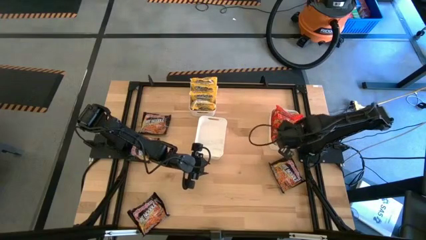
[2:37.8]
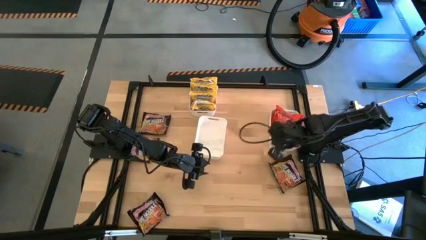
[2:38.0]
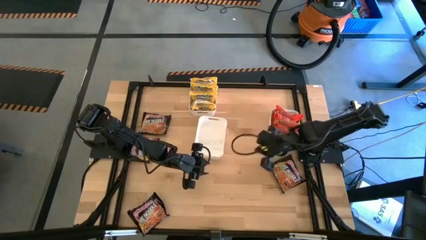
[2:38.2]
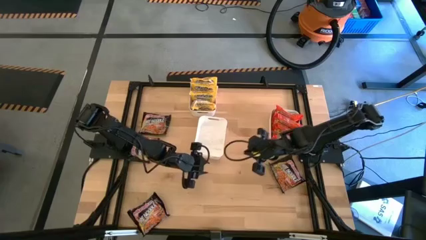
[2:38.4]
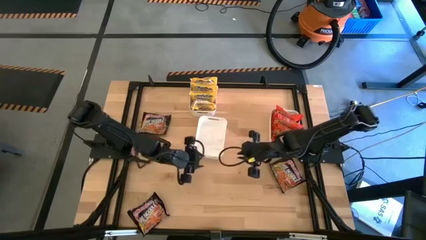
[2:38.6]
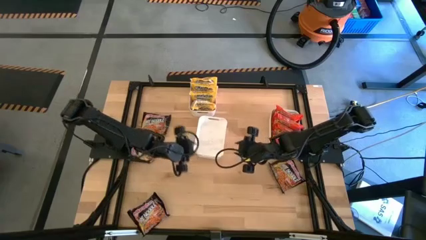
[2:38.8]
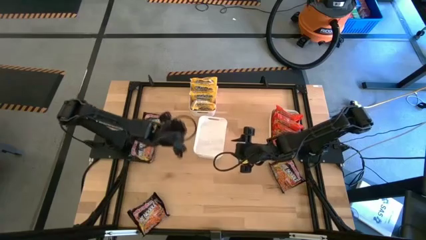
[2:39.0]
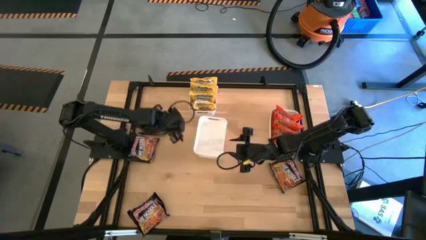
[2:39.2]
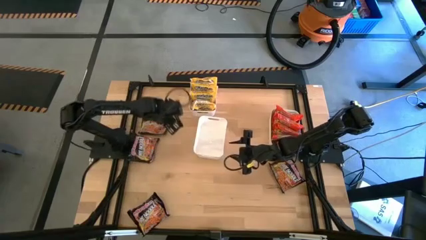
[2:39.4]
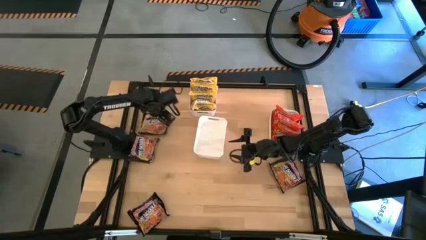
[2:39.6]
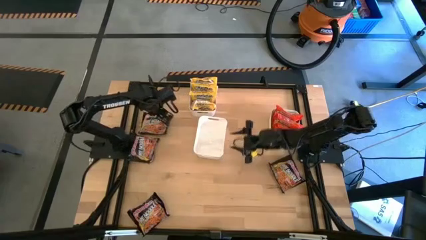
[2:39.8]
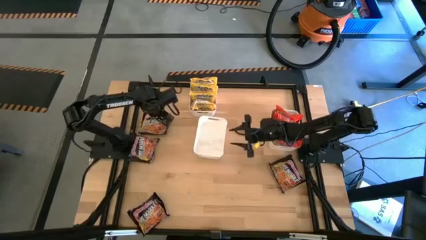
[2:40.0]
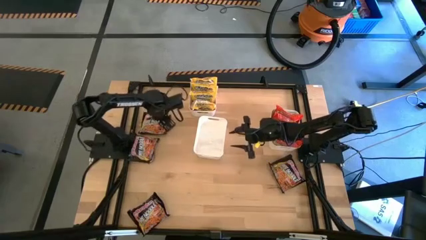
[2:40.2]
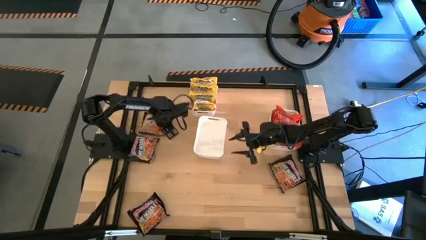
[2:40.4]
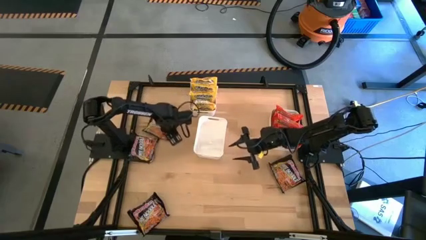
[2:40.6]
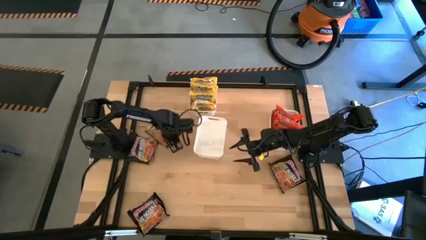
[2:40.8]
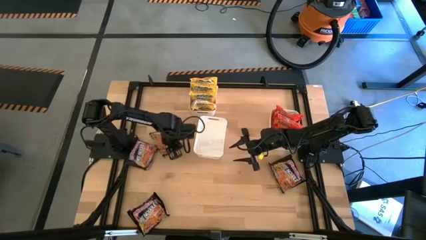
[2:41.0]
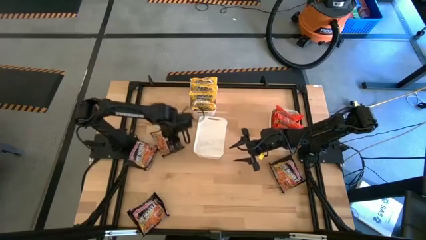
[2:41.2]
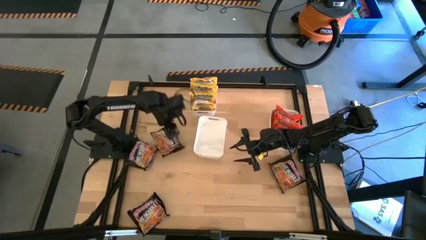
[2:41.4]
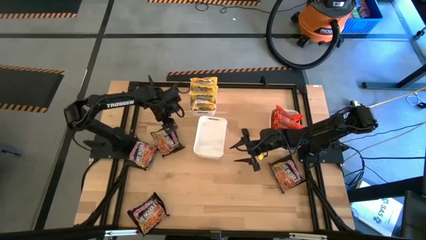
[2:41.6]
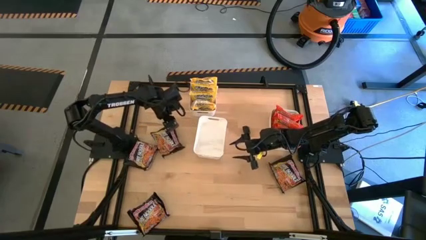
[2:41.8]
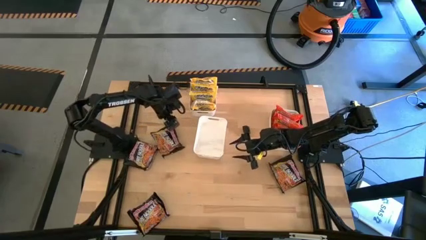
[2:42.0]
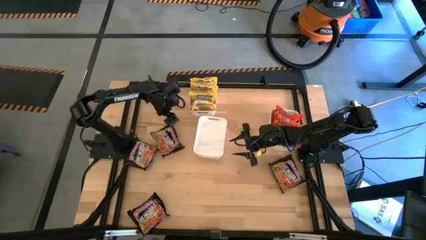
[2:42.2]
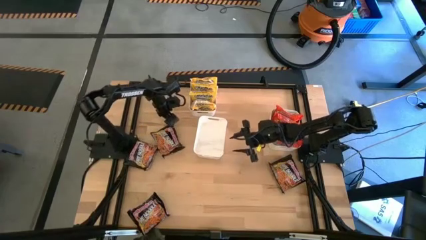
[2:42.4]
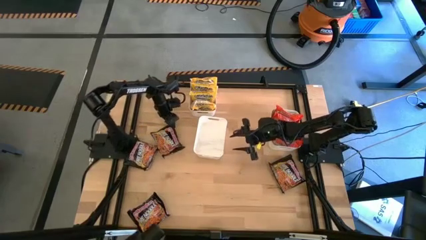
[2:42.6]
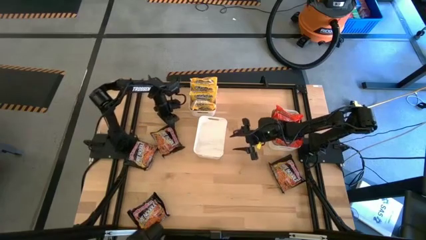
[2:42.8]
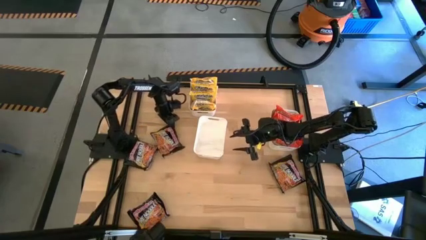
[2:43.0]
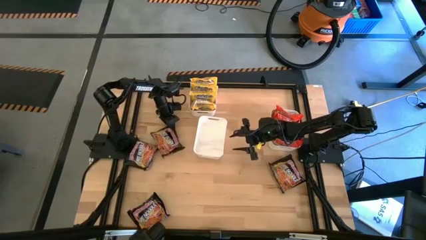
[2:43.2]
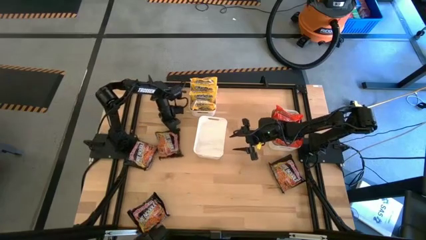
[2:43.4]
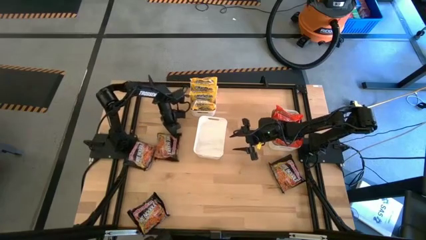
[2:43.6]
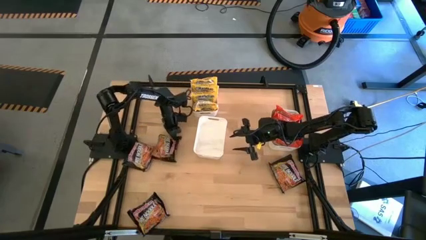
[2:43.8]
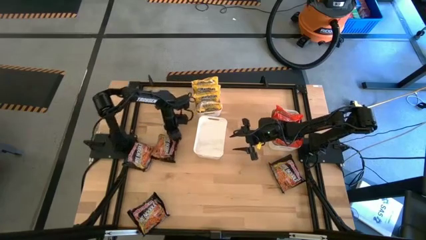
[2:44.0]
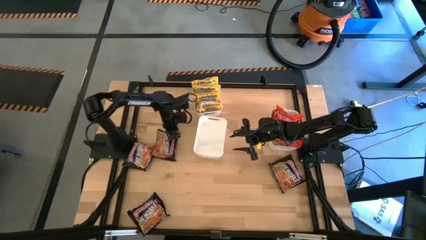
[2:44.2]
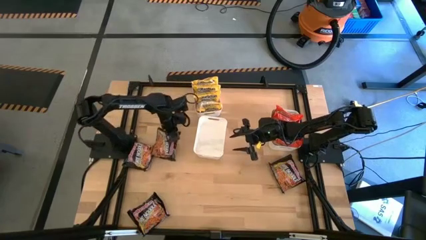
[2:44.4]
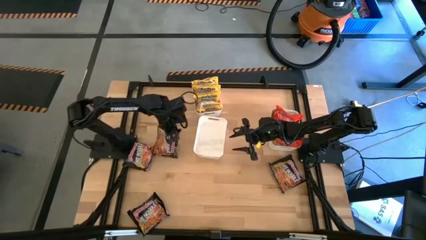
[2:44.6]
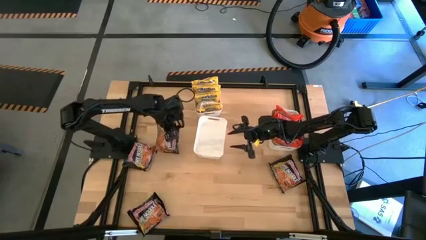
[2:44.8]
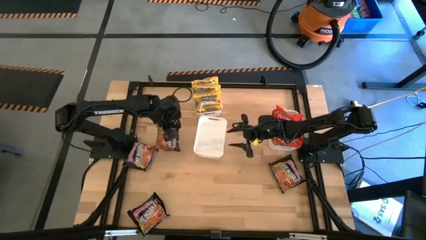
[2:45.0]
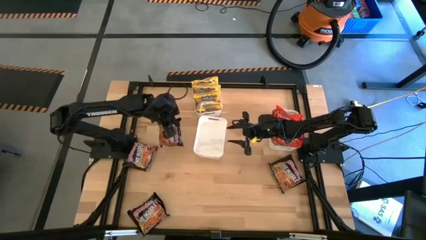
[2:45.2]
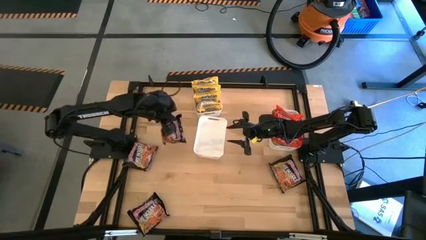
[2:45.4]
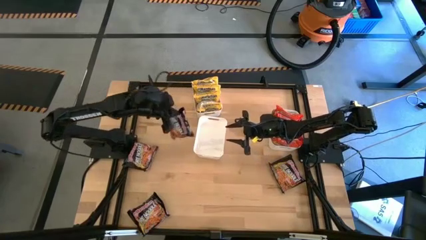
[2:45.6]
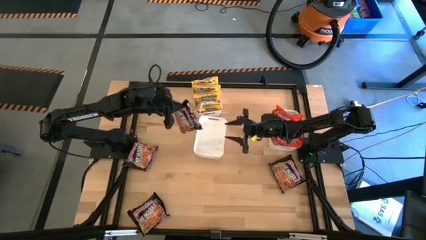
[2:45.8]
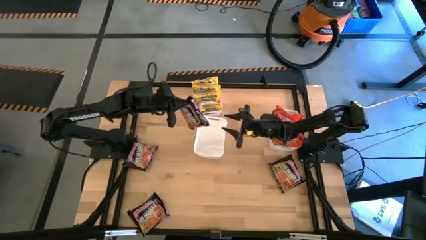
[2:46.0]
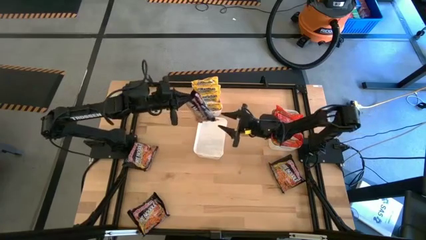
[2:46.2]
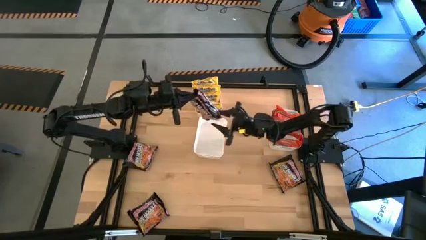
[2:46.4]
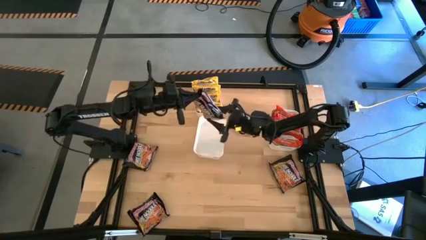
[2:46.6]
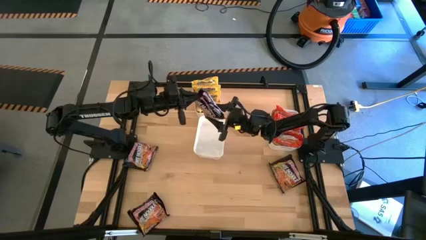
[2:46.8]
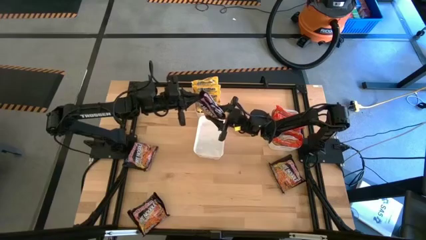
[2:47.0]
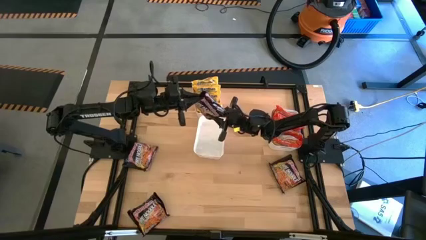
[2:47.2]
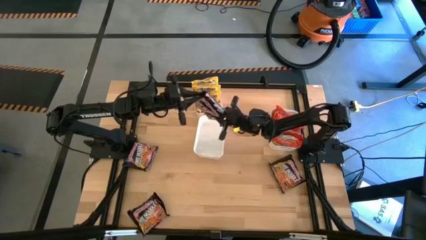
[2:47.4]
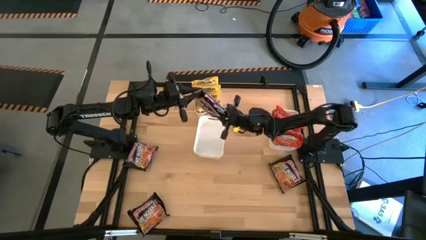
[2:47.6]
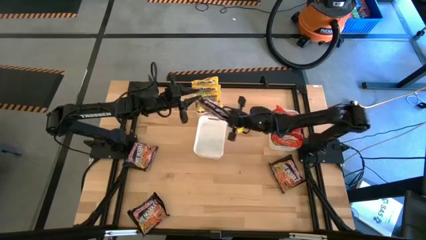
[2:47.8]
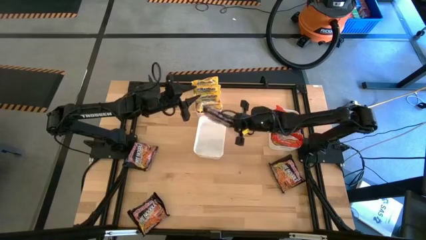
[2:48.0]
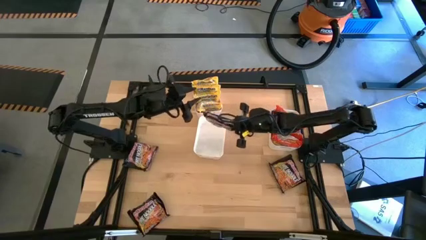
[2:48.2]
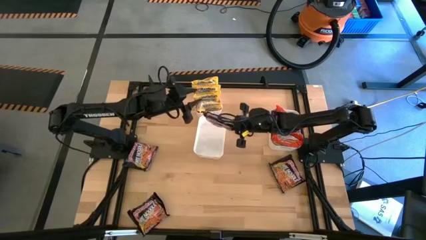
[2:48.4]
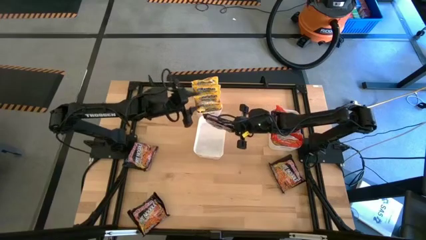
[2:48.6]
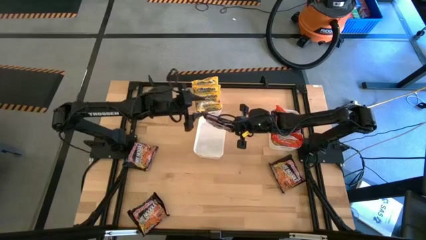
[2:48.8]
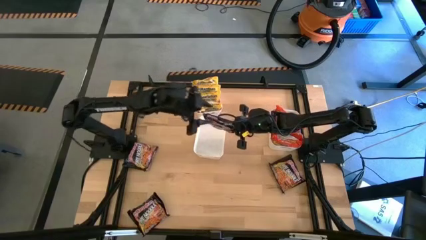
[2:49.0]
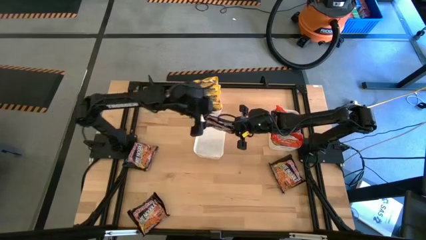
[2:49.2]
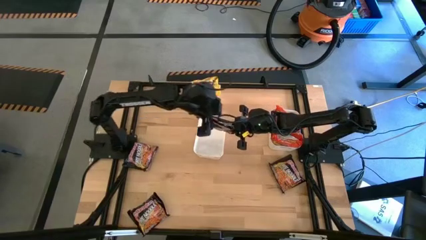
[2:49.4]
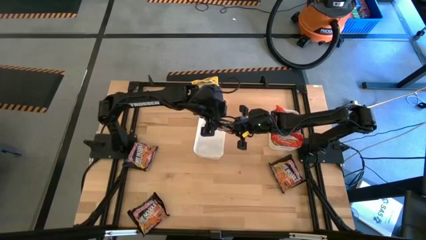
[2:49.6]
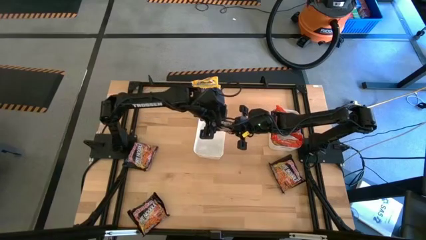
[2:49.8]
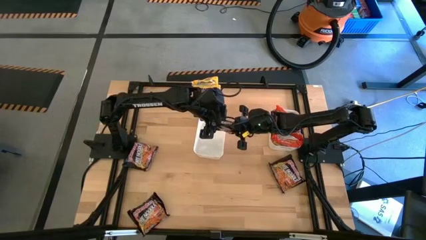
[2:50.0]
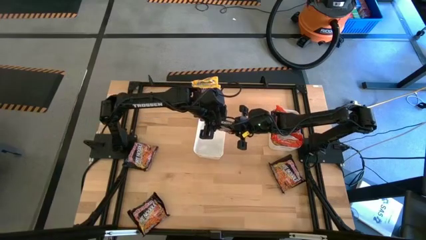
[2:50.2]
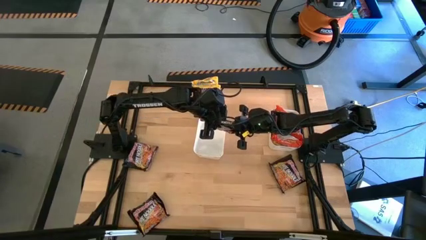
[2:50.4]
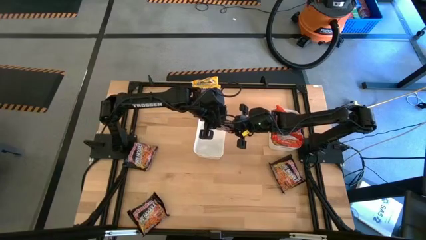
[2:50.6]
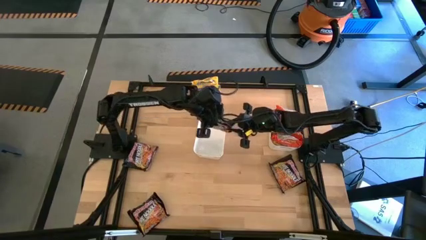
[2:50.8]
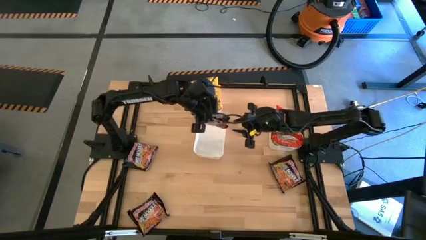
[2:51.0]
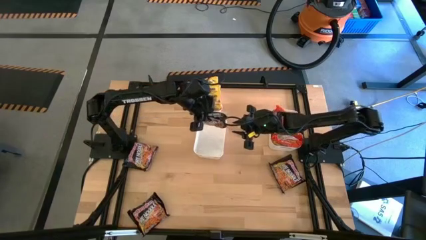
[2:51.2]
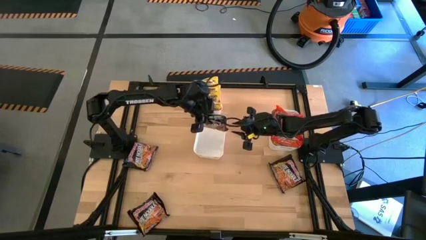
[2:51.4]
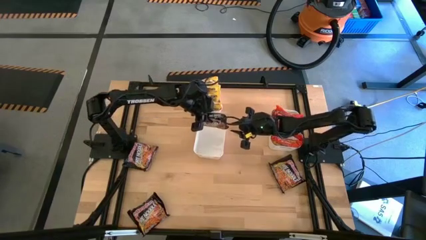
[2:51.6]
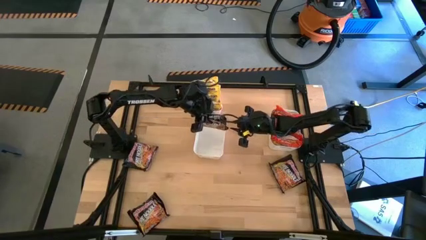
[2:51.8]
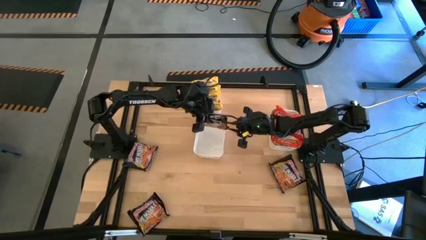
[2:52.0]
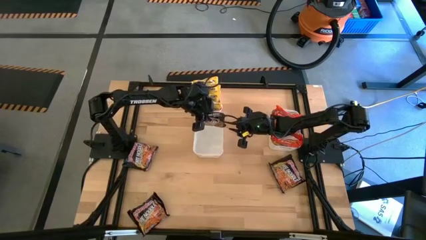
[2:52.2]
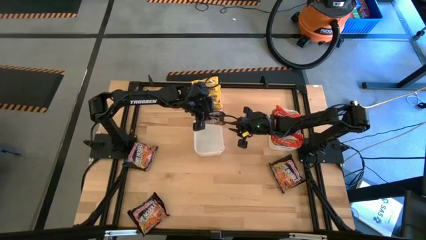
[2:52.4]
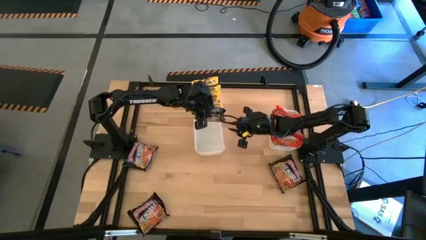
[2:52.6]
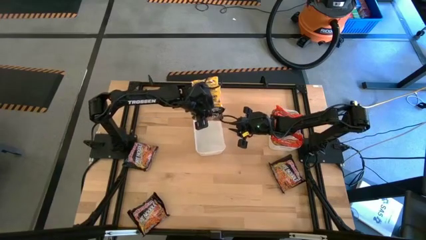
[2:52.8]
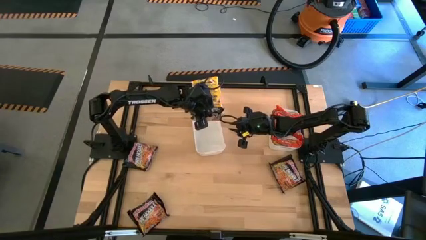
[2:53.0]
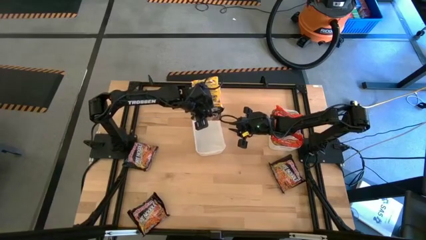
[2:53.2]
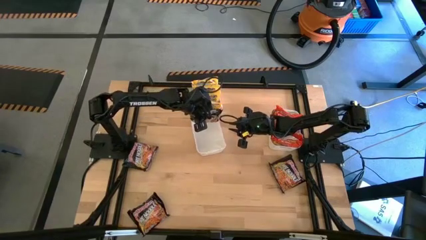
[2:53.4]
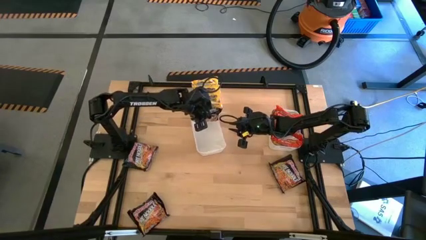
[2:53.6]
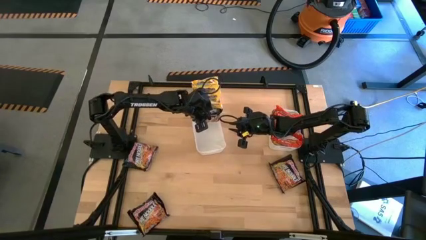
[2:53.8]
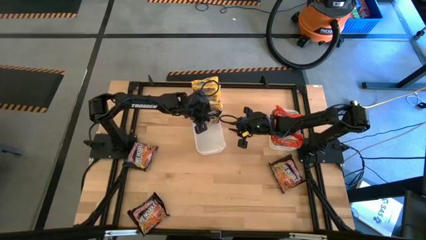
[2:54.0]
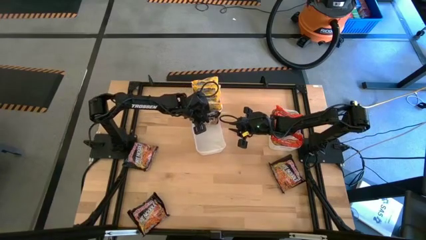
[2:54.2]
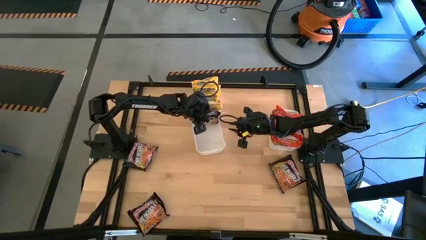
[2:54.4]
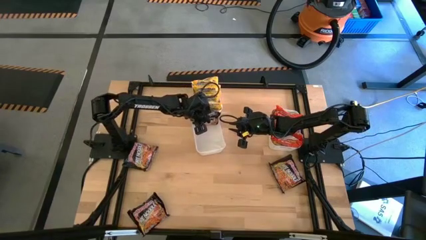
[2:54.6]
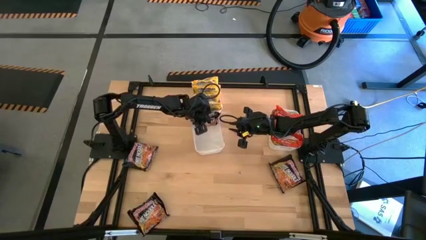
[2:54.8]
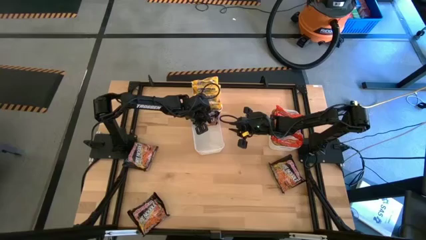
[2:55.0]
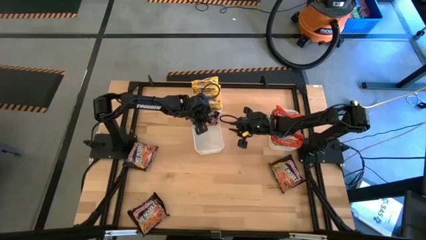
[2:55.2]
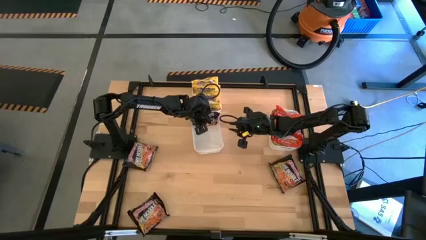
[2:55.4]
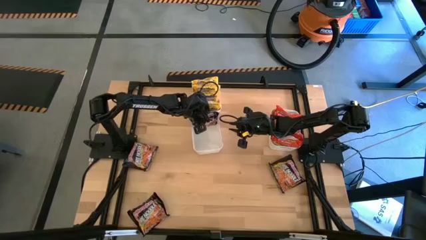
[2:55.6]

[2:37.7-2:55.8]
Task: Sort Maruchan noodles
Put the black noodle pack into the bottom left white bin
